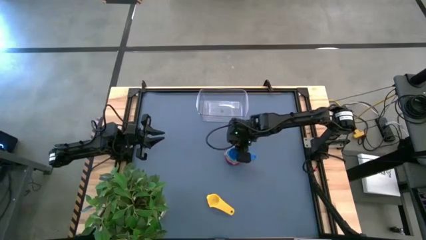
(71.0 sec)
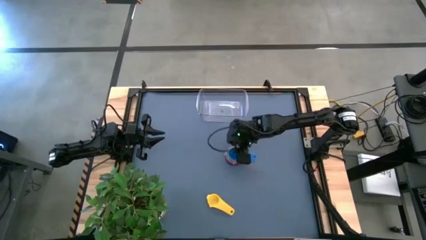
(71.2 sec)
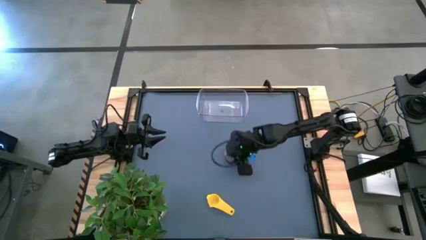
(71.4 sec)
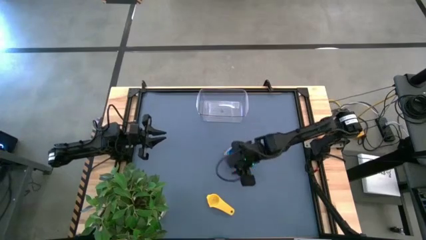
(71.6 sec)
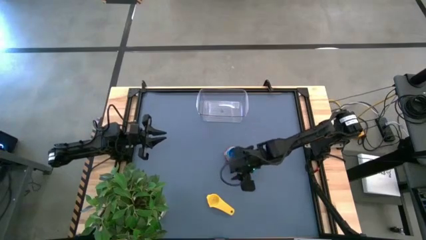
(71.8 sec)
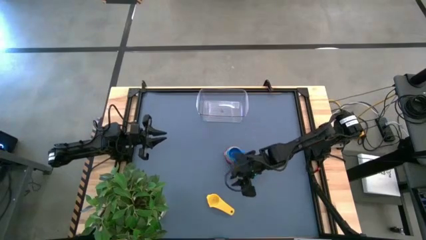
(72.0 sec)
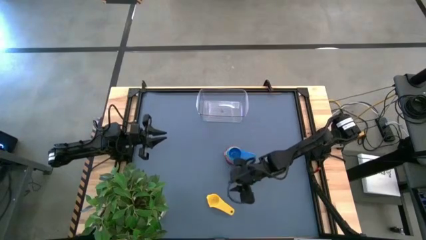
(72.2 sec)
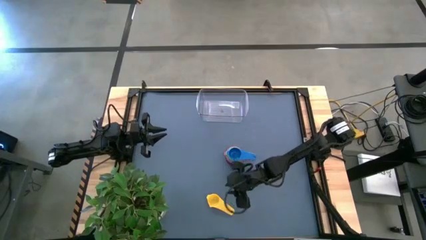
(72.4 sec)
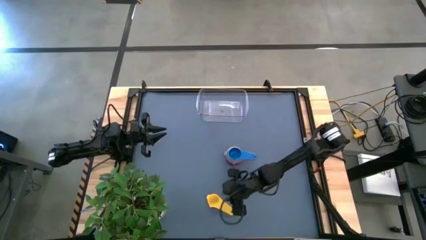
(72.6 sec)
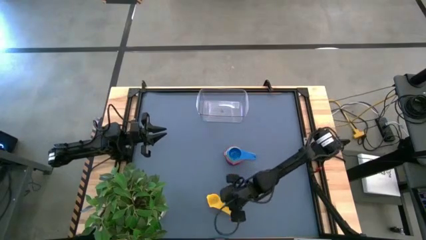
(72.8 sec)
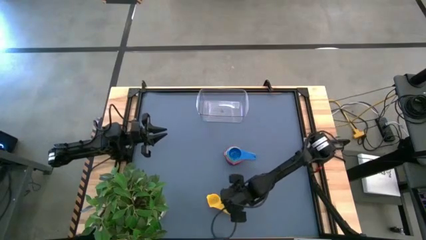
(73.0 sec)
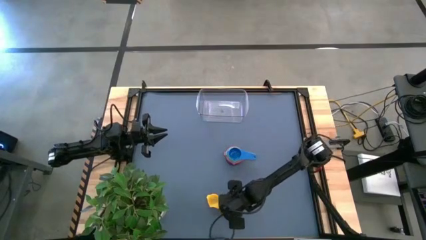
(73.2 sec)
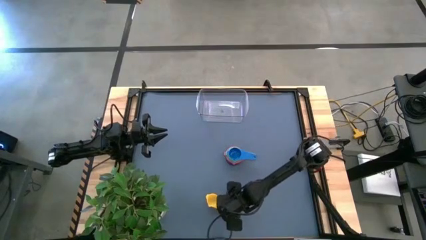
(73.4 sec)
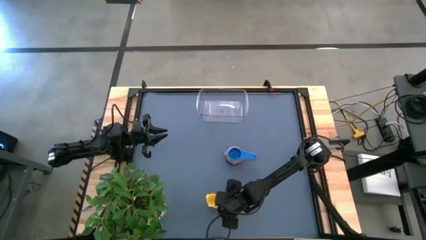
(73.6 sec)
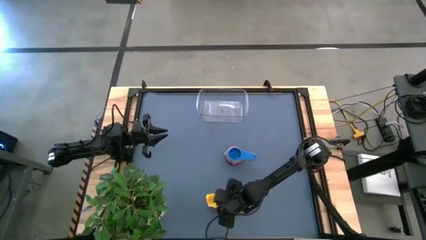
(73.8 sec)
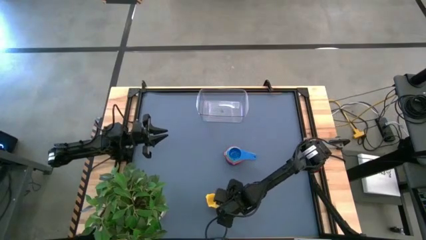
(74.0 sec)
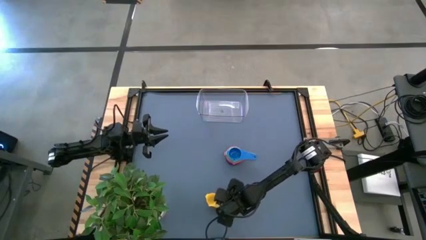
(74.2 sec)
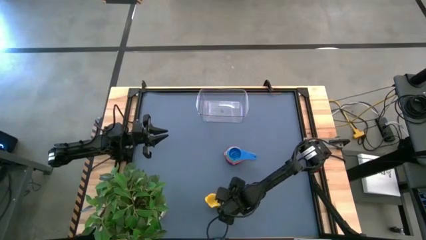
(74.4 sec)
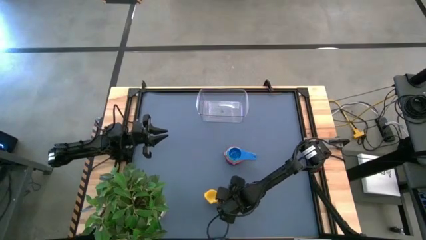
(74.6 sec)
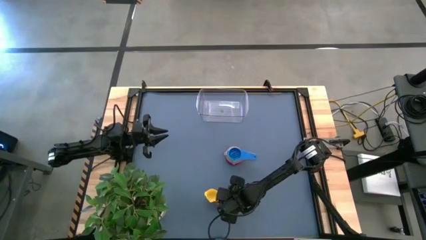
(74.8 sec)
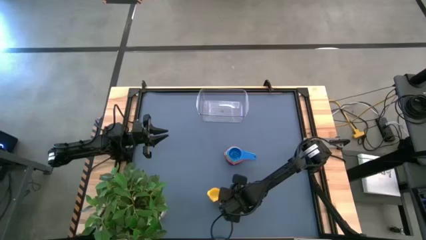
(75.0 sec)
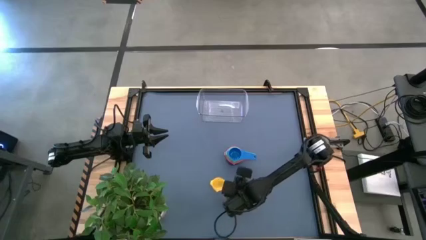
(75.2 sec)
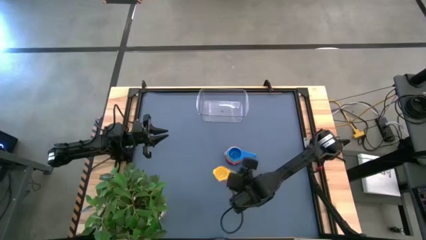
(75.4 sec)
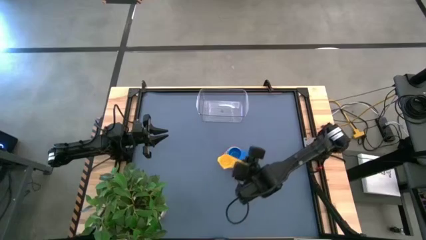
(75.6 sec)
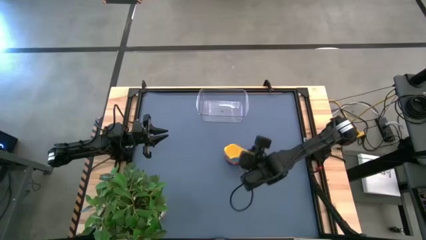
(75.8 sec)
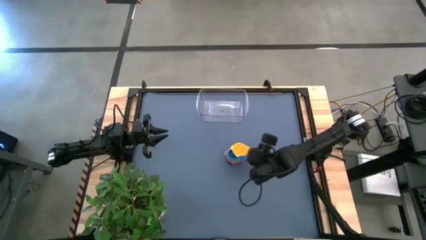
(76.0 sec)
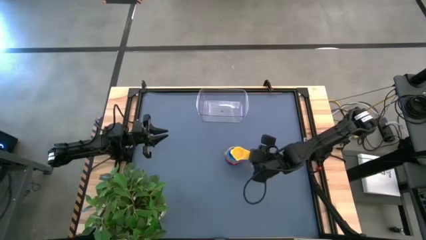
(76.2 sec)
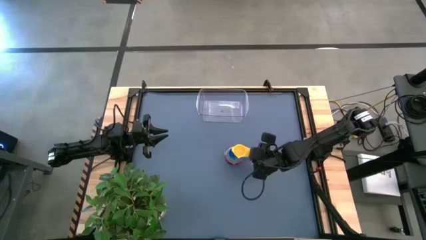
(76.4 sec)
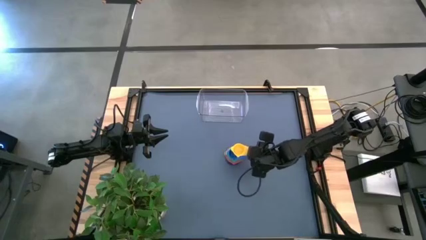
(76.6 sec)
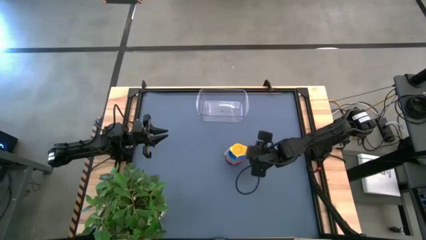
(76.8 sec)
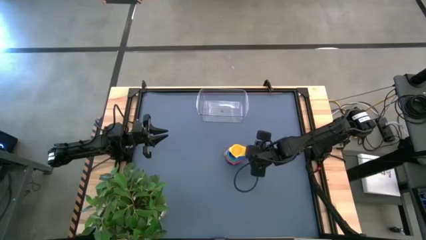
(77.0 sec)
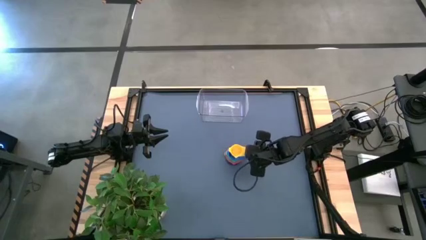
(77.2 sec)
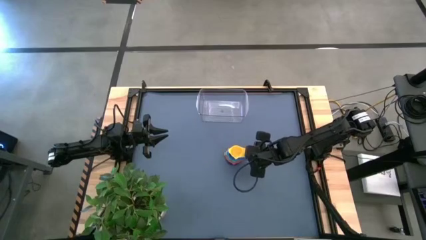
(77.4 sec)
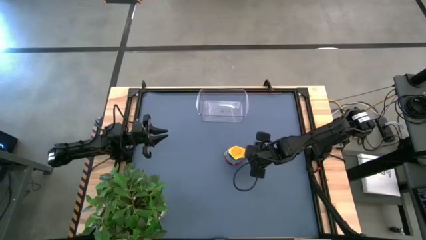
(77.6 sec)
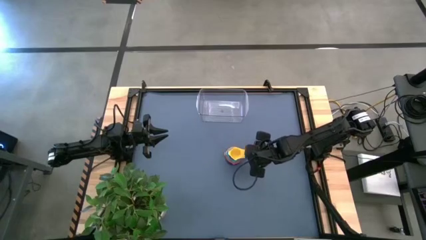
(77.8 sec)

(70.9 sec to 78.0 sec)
Task: Nest measuring cups in basket
Stack the yellow measuring cup on top of the blue measuring cup

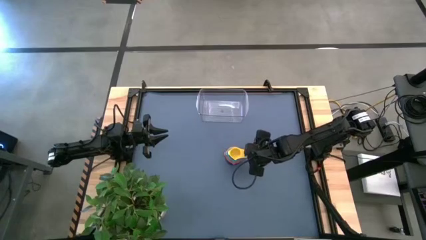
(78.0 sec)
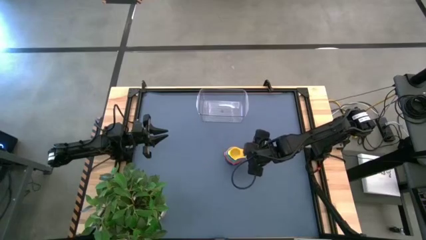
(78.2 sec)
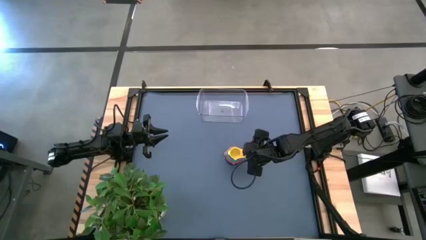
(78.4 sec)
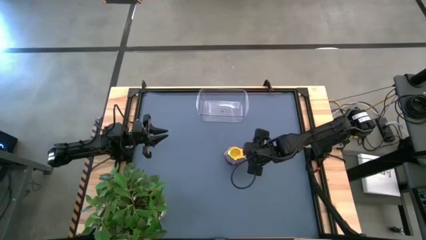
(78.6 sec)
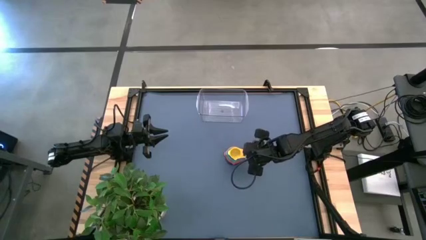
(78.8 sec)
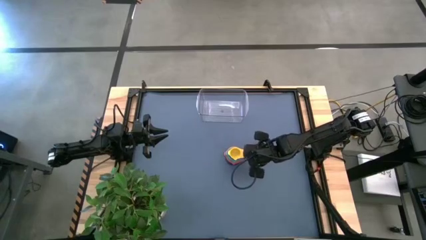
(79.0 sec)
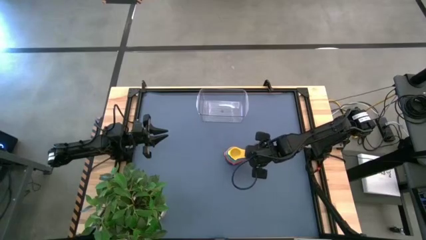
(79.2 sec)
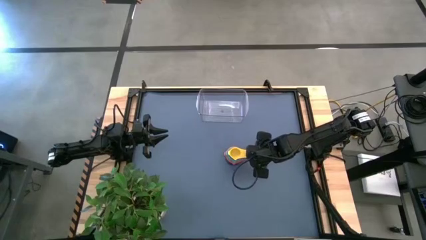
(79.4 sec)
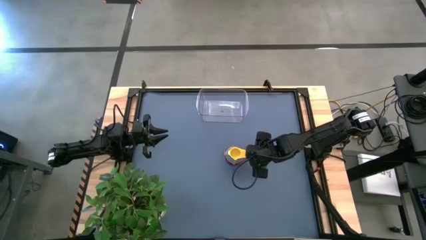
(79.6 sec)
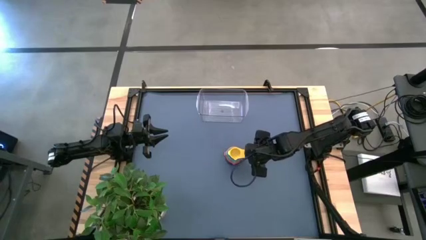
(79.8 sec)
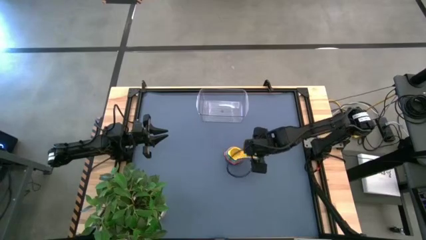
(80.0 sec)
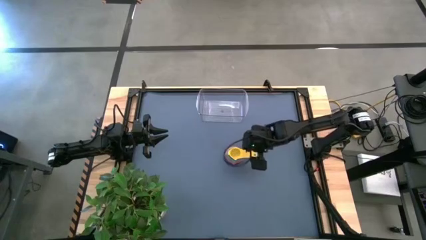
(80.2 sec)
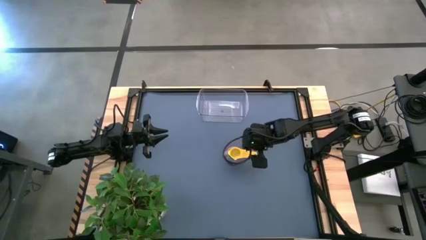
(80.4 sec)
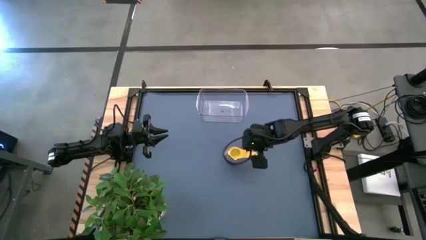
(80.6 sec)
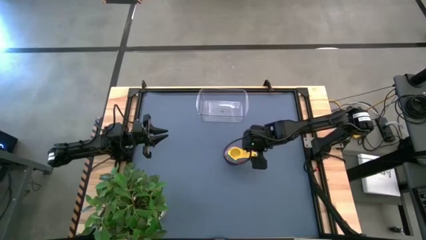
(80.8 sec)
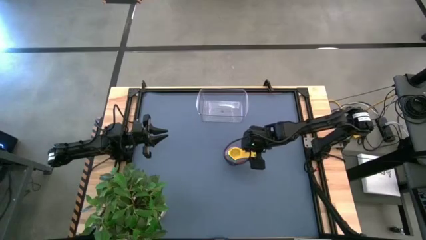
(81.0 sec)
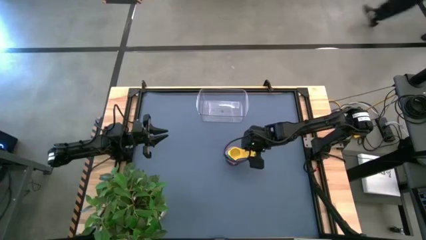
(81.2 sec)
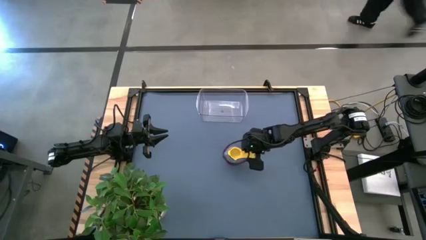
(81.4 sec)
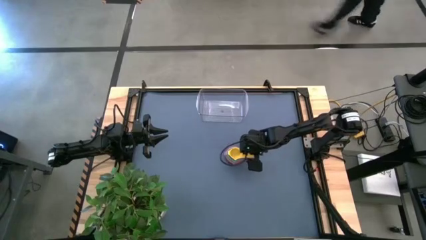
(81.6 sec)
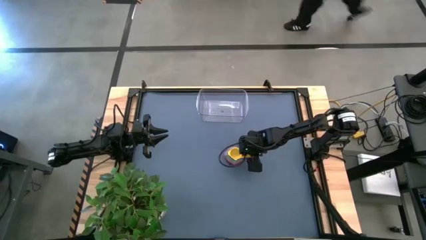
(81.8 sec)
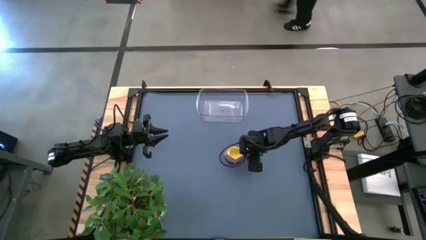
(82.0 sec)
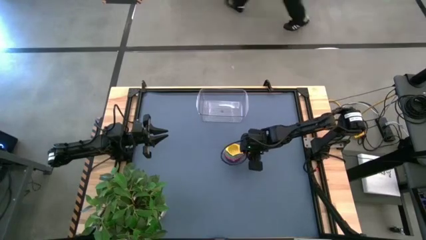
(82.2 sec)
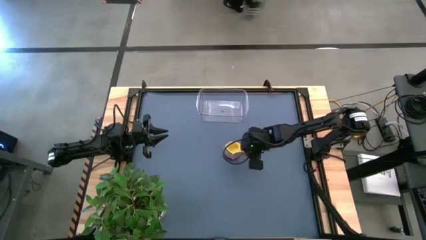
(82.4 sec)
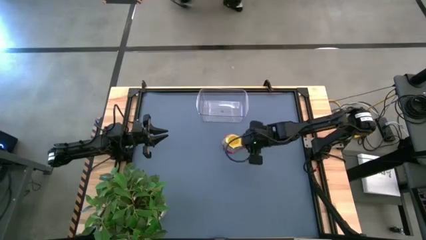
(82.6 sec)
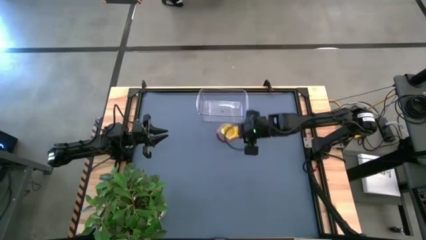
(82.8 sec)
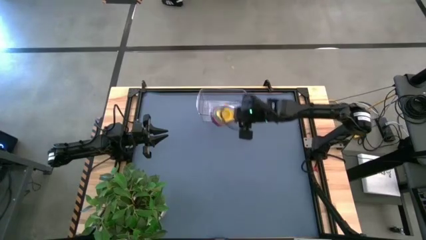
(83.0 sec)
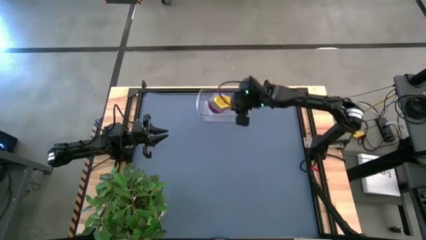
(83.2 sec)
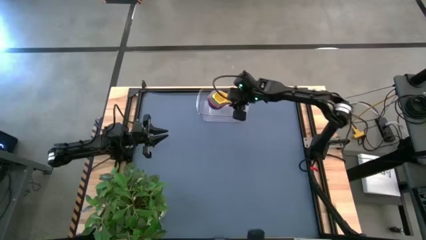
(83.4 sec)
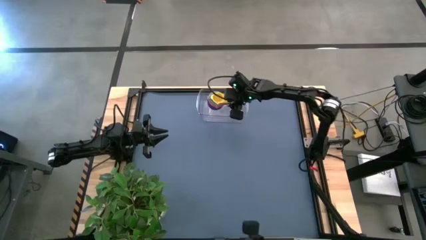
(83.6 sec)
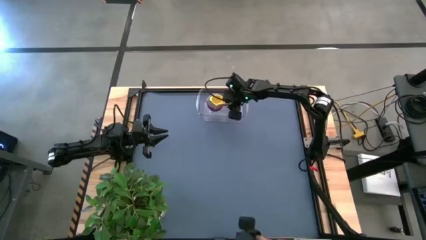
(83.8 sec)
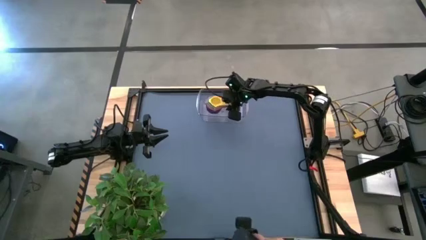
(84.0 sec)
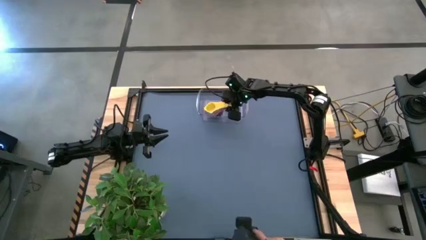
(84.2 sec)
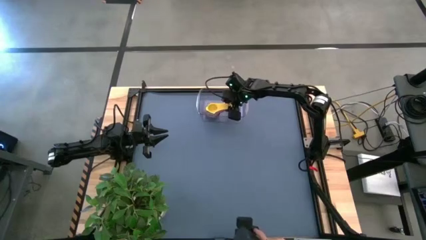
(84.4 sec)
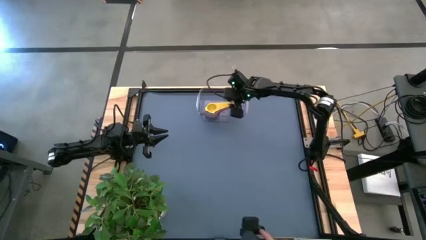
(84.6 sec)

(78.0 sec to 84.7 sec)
Put the nested measuring cups into the transparent bin
